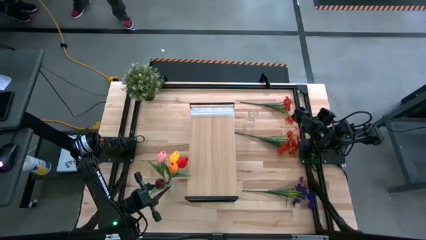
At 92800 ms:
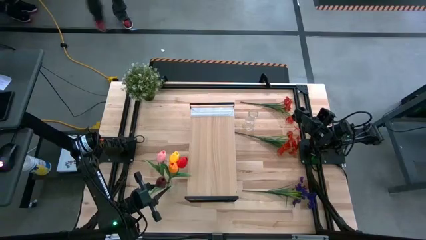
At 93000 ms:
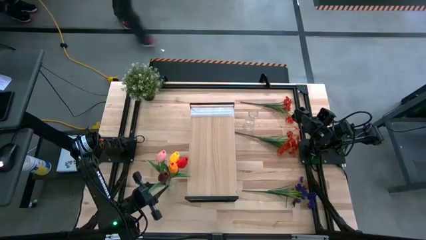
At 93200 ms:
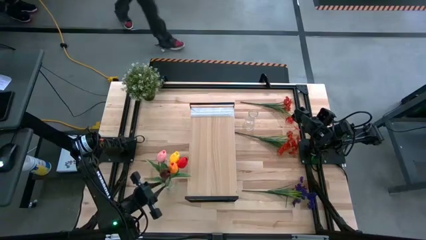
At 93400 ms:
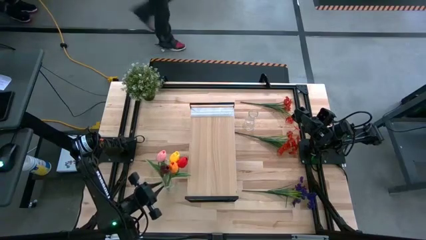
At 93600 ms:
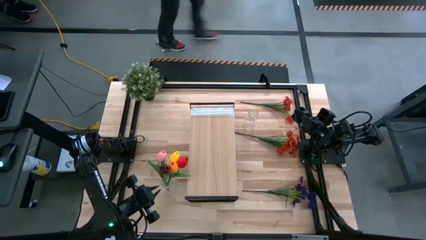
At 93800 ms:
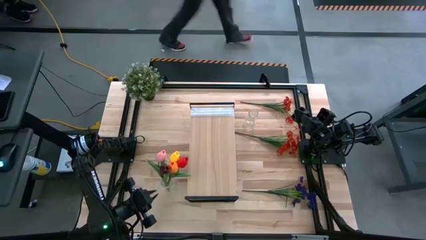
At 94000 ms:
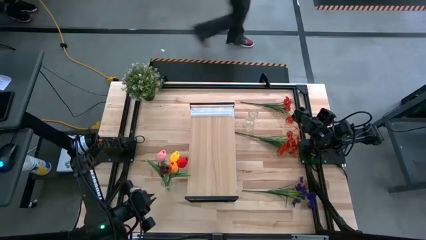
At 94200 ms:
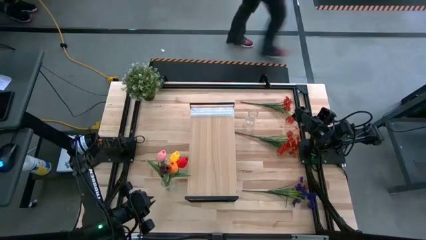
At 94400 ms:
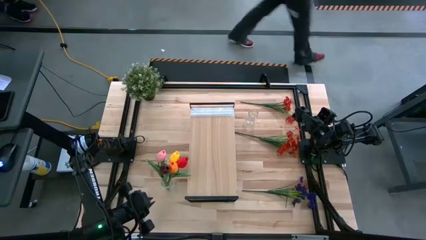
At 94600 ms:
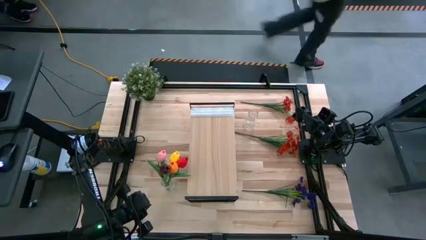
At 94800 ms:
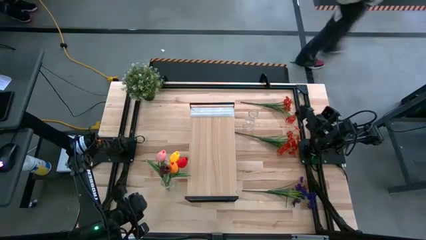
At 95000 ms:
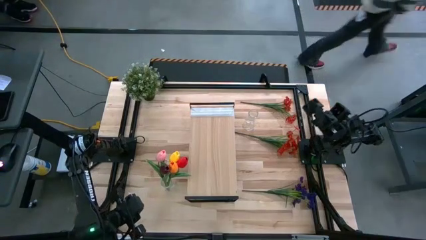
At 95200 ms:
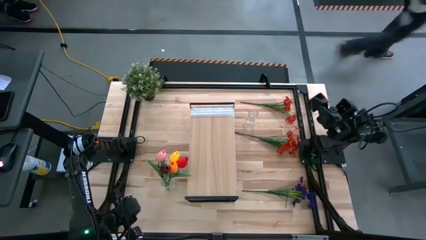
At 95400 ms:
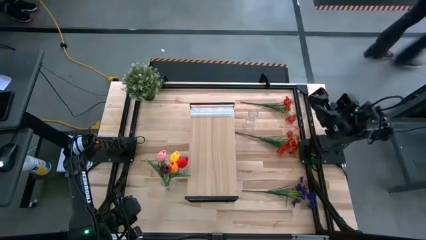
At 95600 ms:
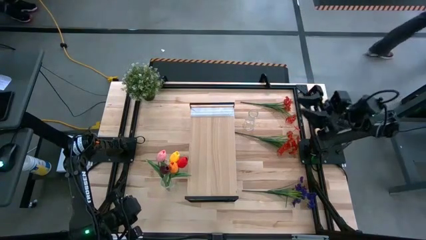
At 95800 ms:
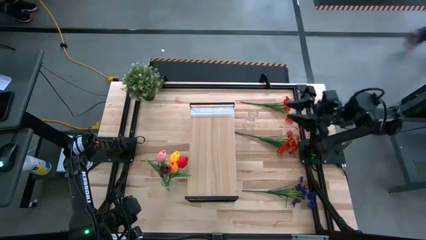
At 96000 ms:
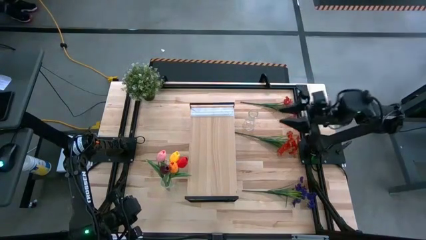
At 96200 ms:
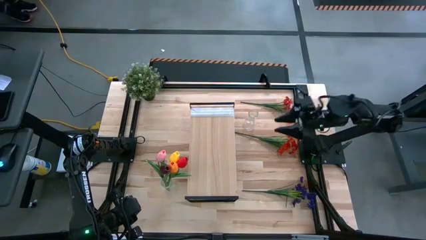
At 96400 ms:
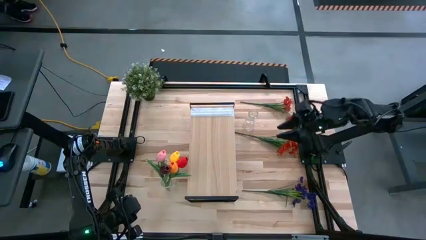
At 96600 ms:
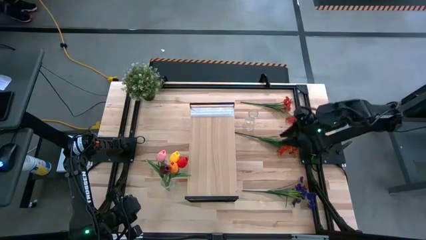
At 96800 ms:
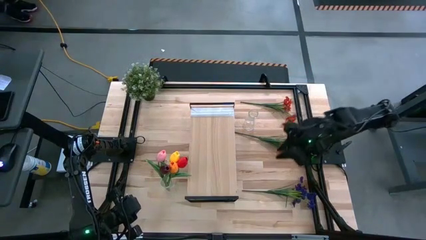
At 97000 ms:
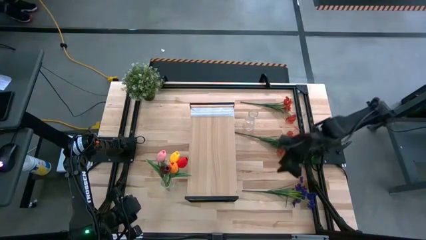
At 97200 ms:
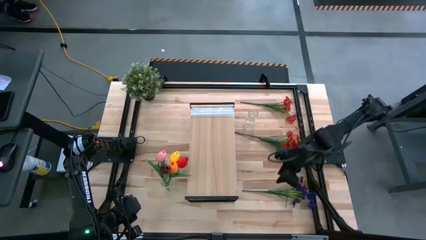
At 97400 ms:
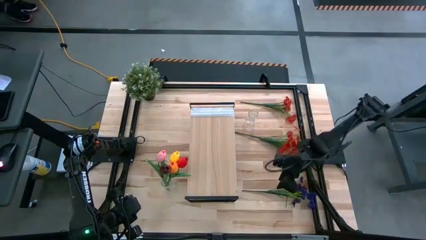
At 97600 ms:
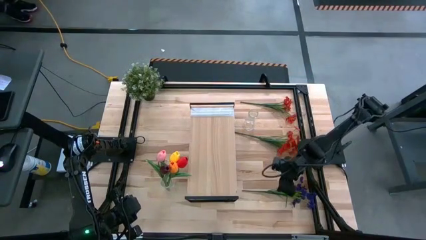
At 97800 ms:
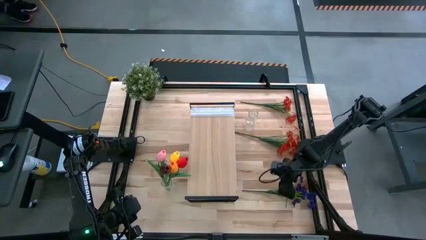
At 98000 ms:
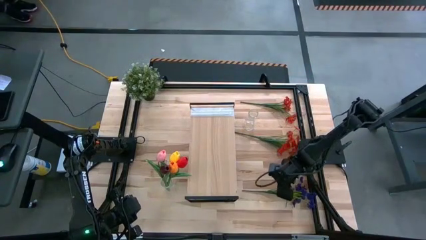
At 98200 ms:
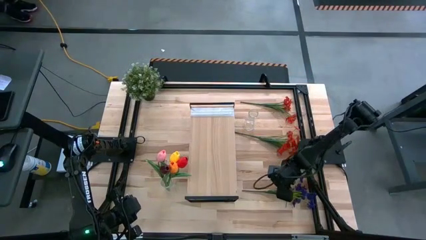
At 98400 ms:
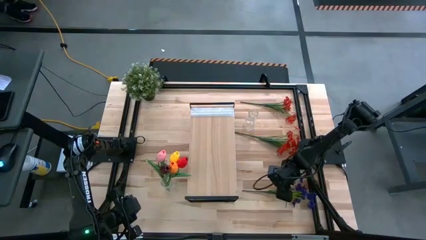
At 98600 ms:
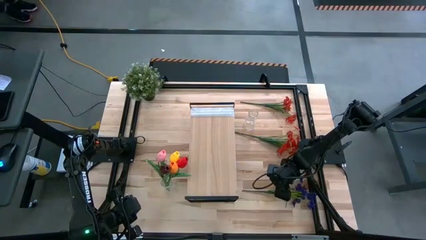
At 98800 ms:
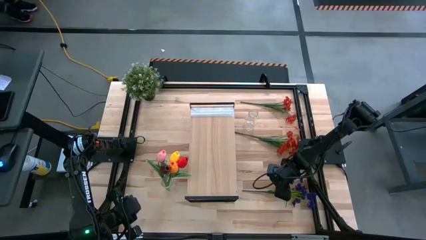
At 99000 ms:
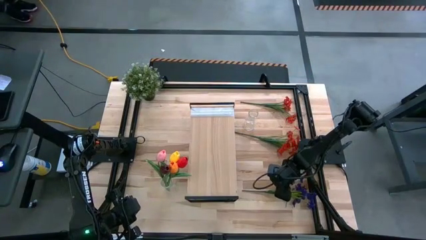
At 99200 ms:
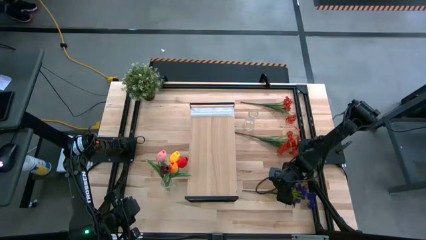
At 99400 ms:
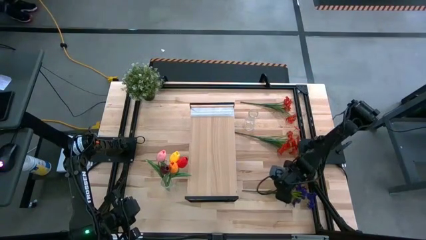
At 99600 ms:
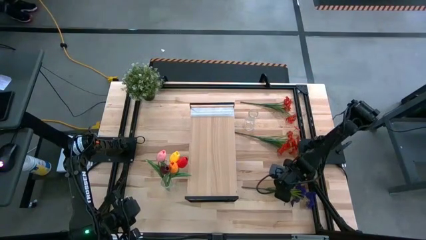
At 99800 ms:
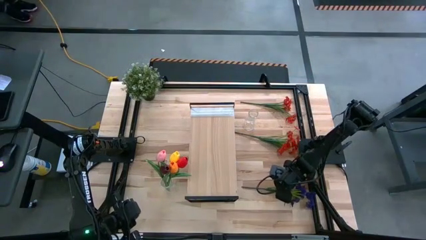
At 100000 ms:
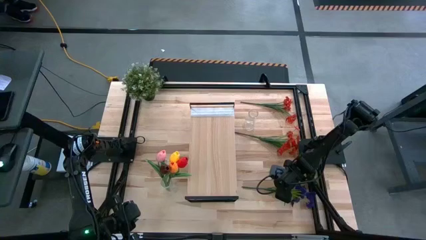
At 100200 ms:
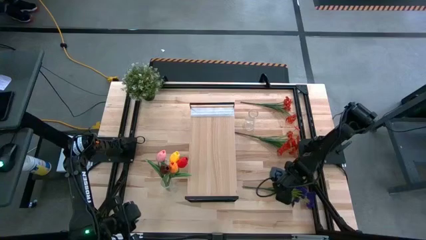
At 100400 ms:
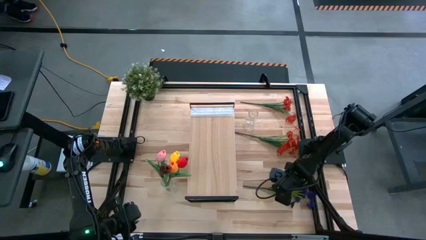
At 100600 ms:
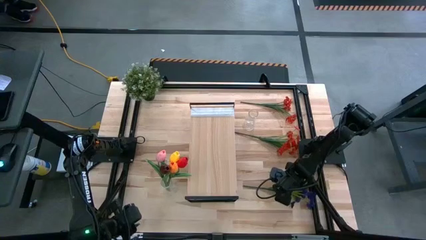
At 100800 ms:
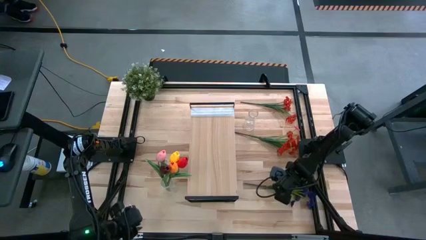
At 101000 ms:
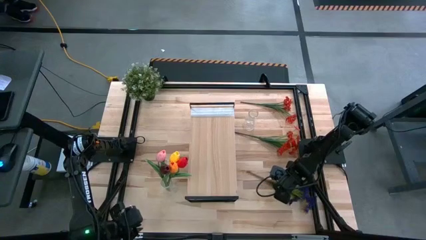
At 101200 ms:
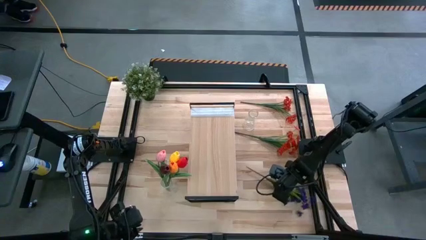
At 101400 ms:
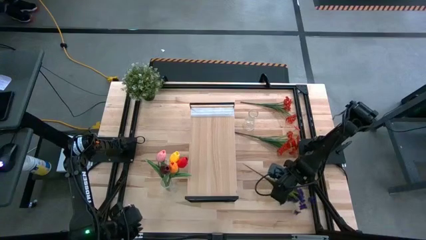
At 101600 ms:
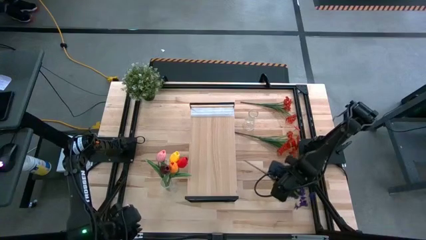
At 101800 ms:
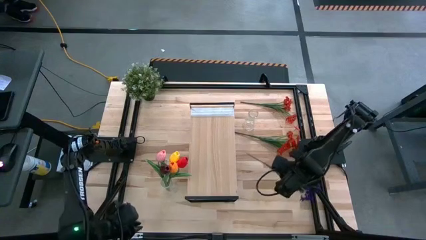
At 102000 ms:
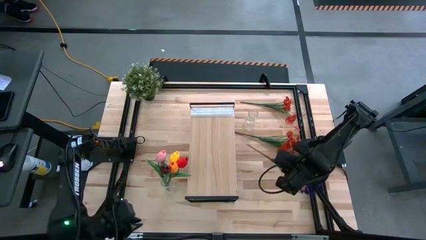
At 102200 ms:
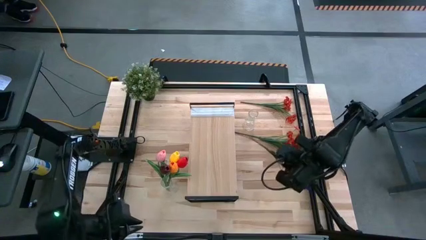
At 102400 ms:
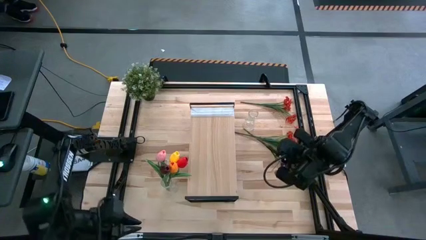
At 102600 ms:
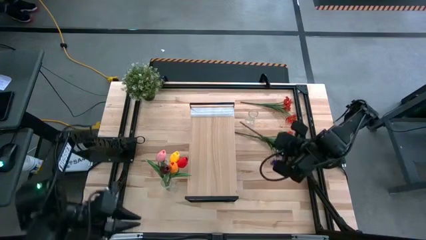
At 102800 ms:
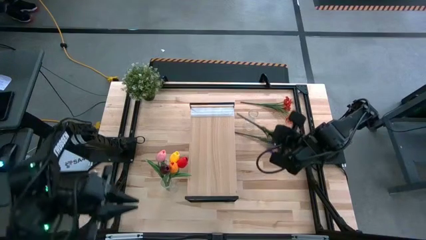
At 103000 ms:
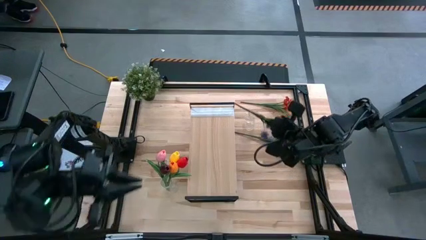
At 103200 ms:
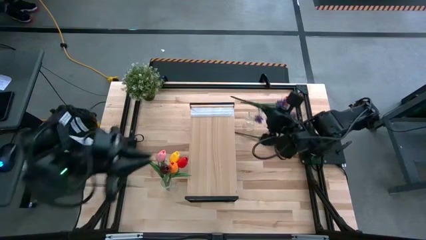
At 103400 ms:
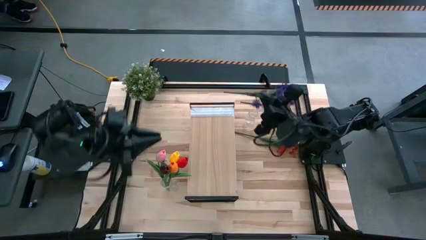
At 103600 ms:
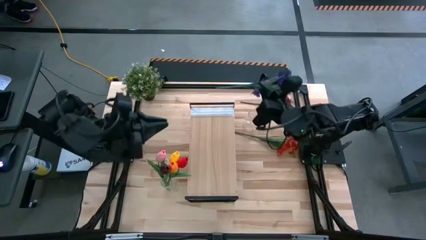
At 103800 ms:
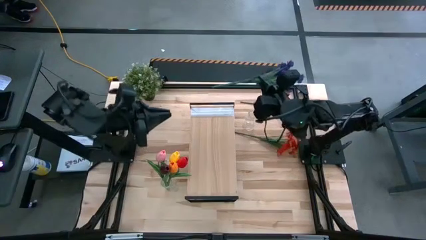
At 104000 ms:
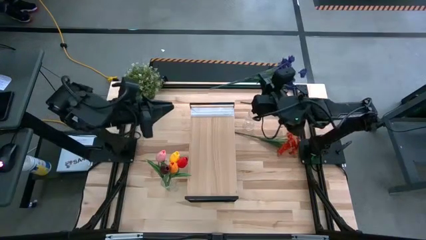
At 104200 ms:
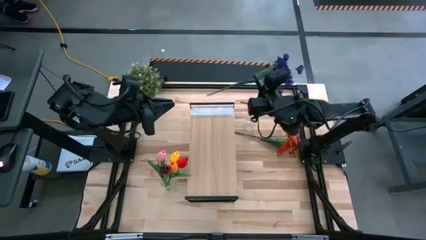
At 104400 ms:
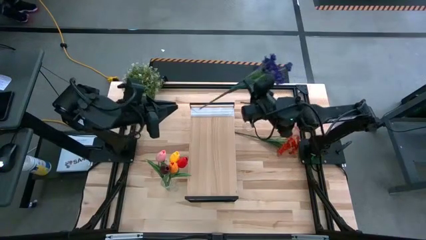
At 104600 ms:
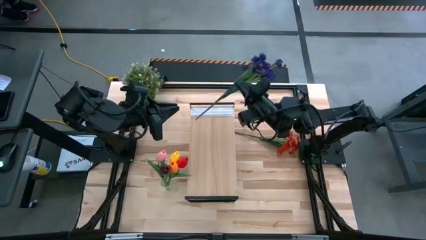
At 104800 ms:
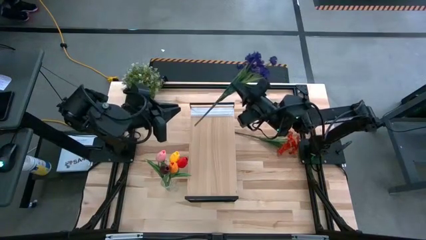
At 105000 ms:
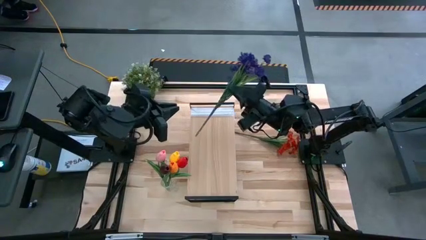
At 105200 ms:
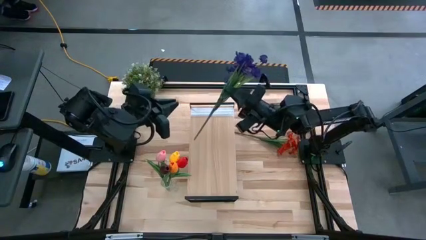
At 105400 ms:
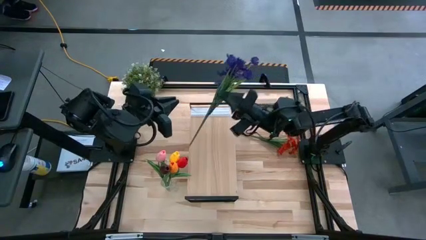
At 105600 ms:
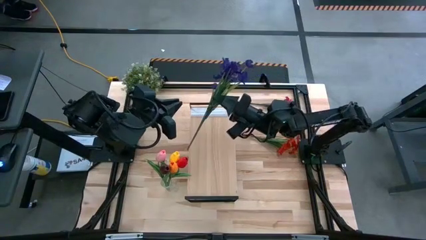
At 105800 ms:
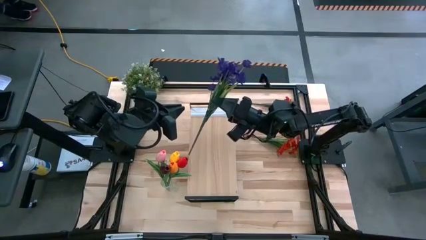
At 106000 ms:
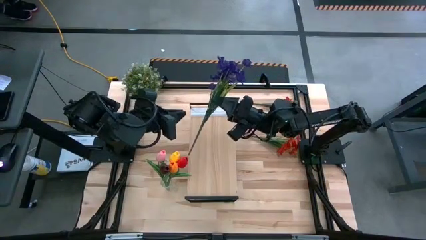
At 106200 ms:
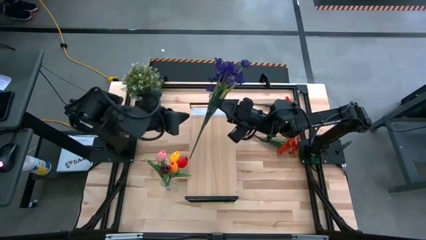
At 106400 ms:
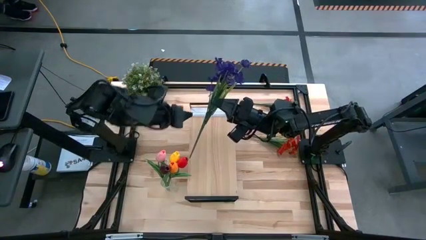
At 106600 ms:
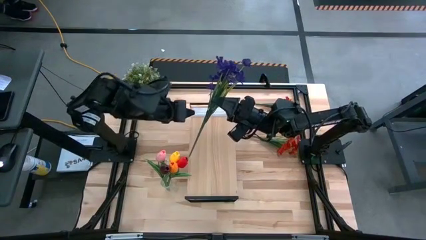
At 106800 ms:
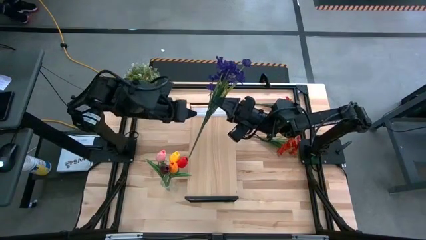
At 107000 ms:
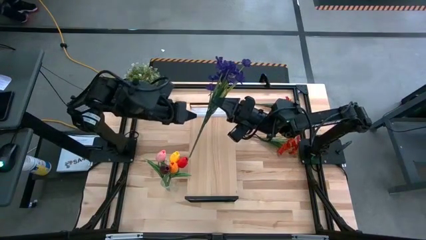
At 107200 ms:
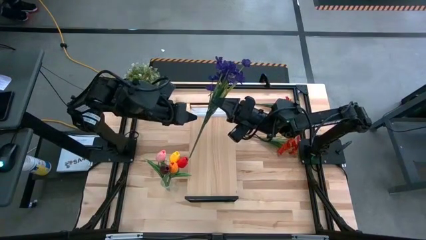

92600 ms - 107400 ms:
Task: Pick and place flowers into a vace then onto a shelf
Put the blue flowers into the top vase

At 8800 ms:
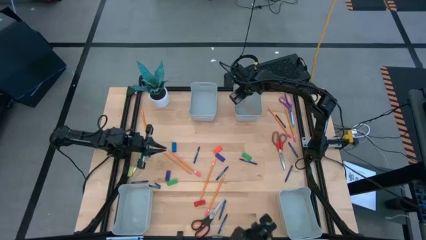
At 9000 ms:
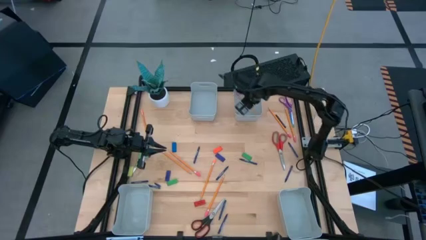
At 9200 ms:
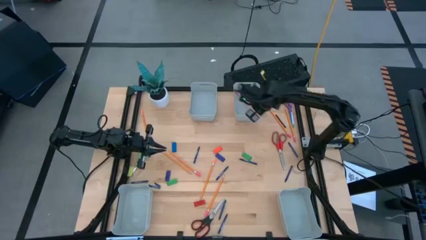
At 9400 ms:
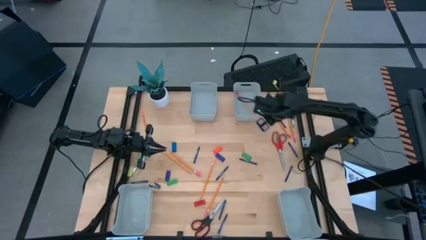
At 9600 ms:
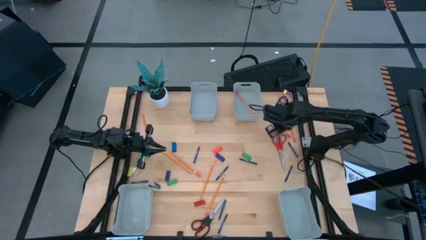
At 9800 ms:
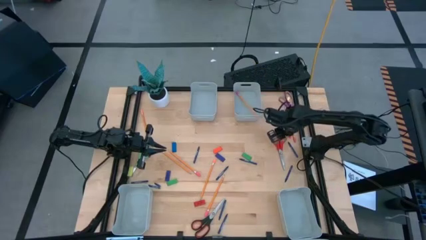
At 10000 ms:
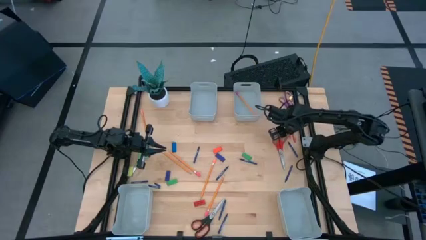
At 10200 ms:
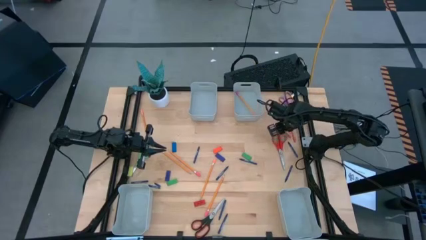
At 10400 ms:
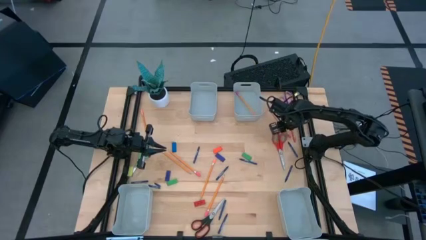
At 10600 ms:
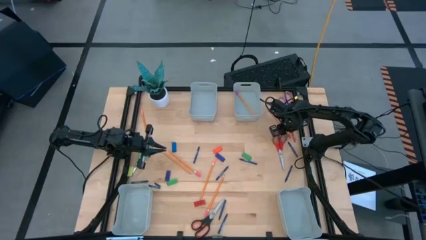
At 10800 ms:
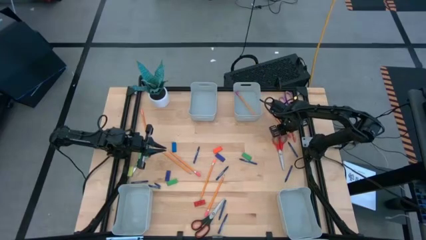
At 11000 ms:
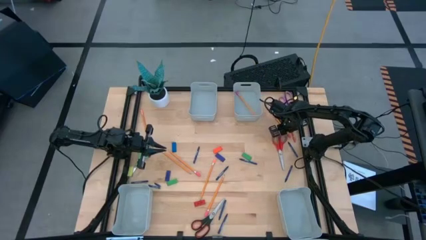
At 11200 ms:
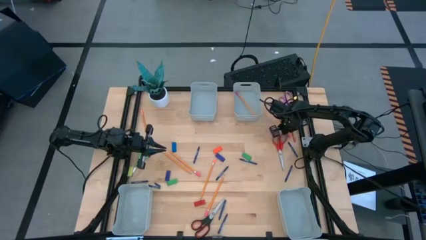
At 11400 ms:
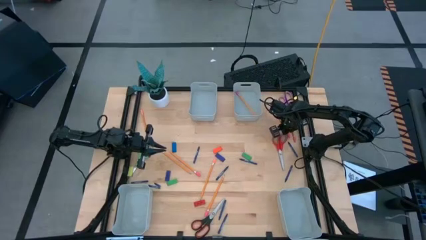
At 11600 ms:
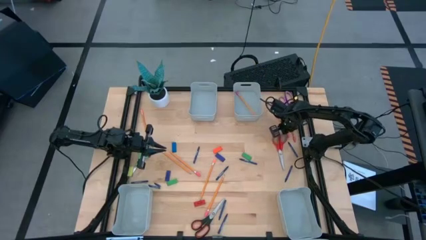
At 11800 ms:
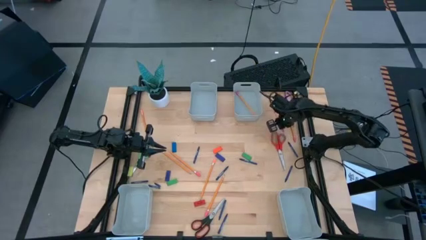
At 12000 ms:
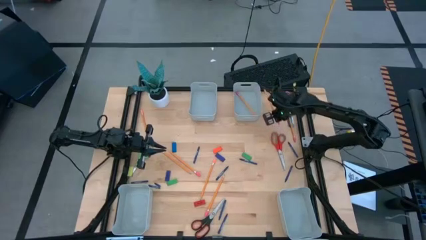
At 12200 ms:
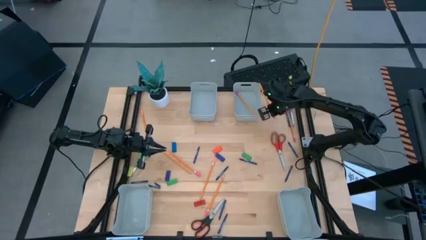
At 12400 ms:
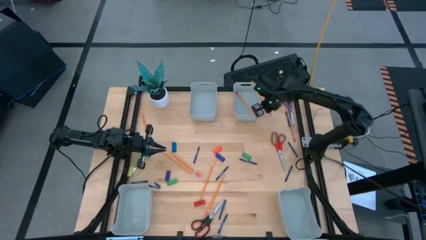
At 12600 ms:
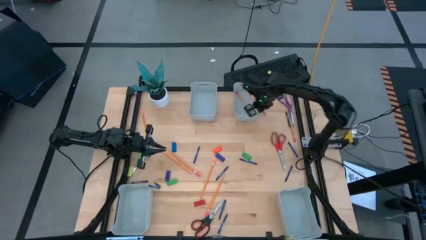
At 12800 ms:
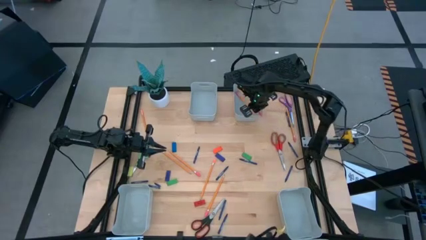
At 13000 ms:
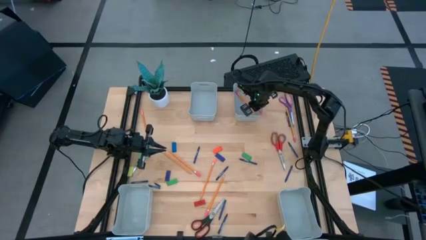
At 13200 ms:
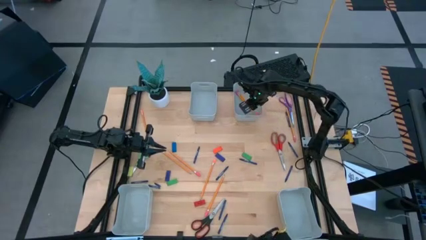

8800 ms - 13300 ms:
Task: Sort crayons/erasers/pens/pencils in bins
Put the yellow pencil into the top right bin
